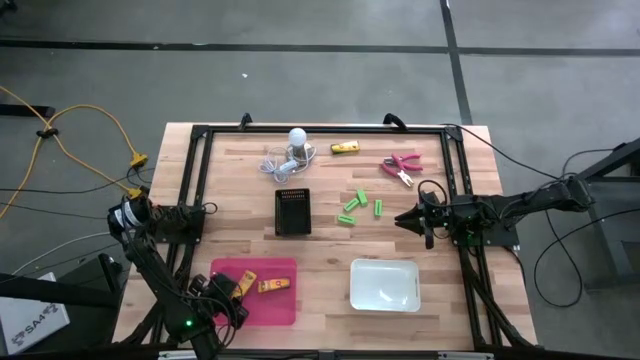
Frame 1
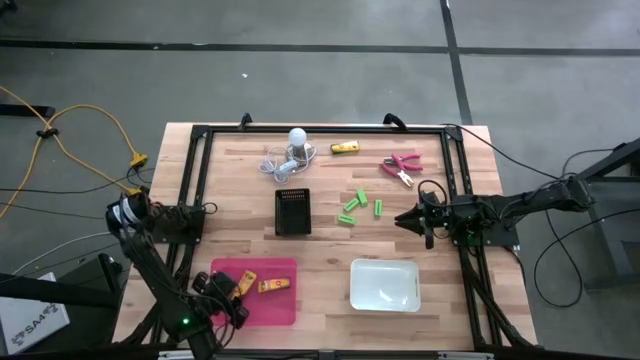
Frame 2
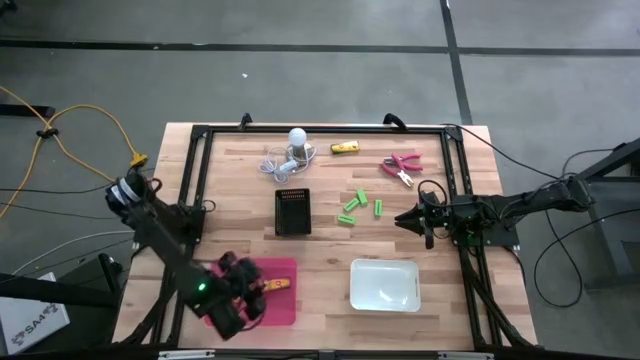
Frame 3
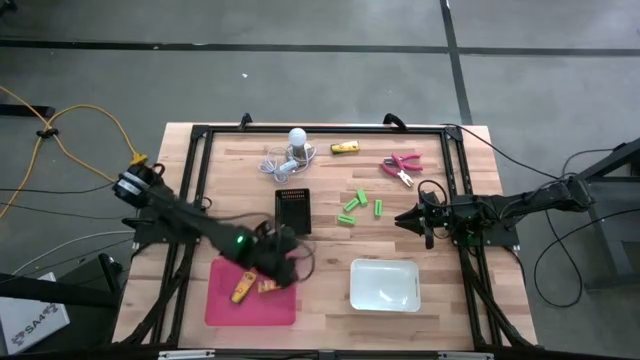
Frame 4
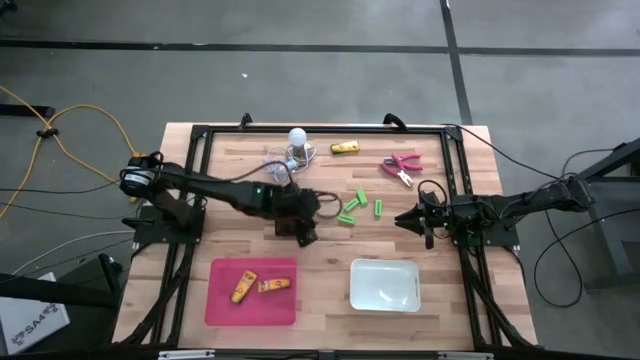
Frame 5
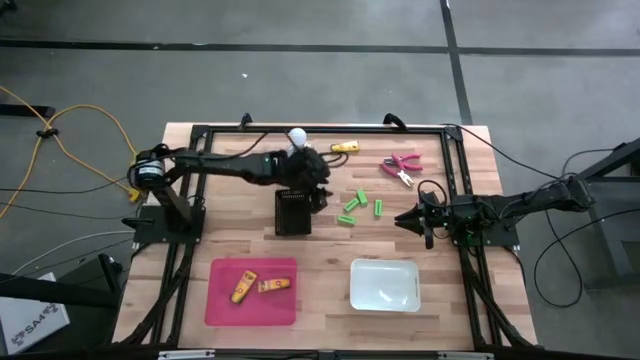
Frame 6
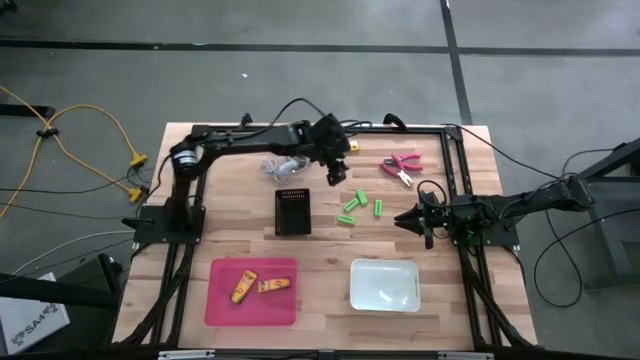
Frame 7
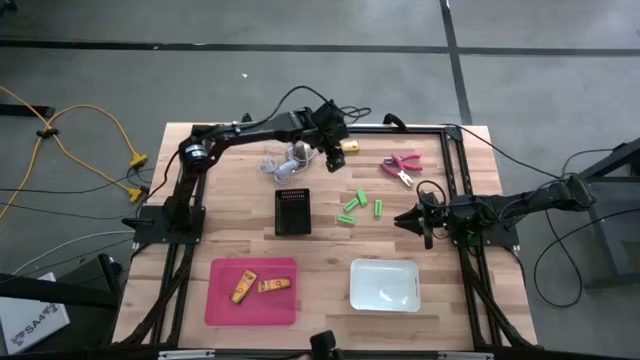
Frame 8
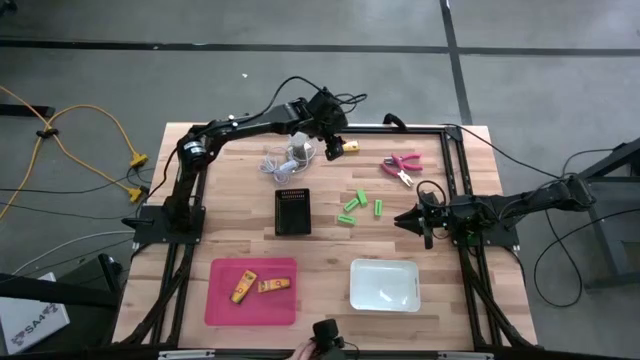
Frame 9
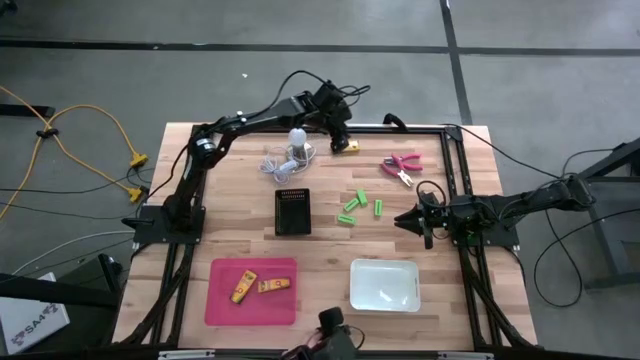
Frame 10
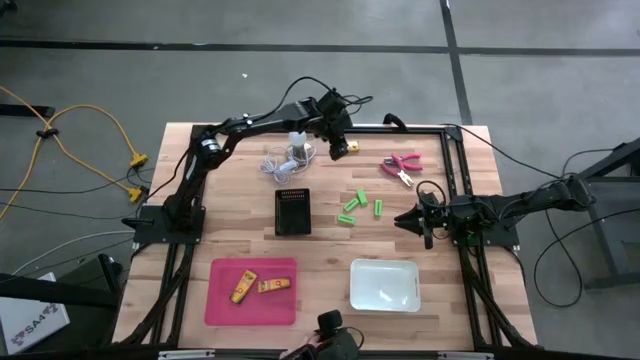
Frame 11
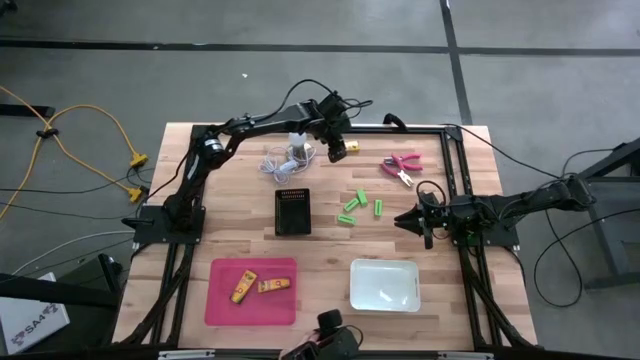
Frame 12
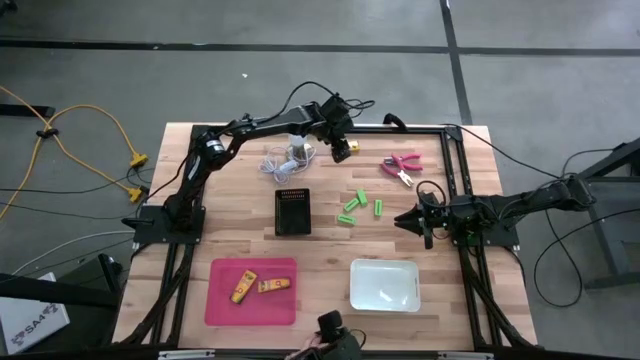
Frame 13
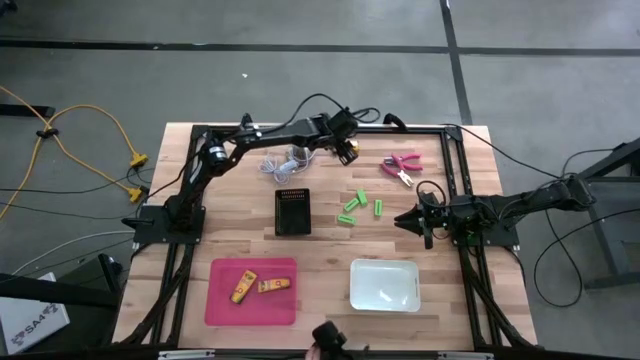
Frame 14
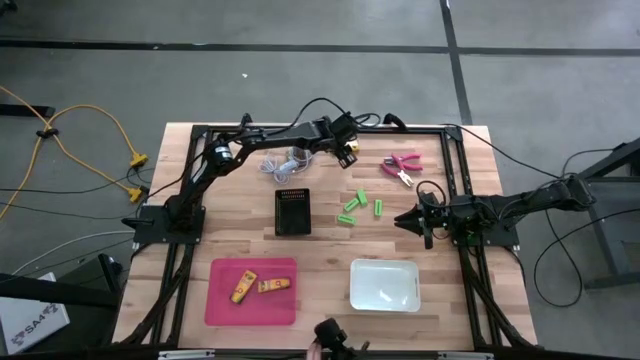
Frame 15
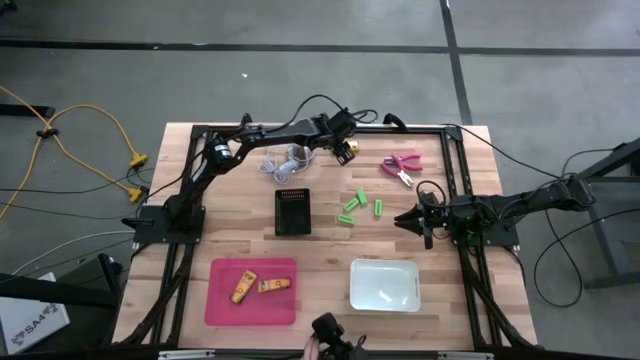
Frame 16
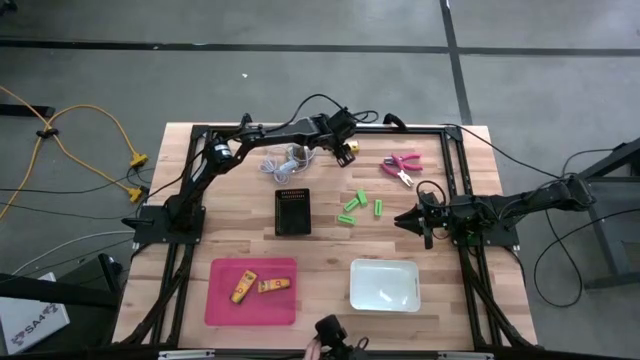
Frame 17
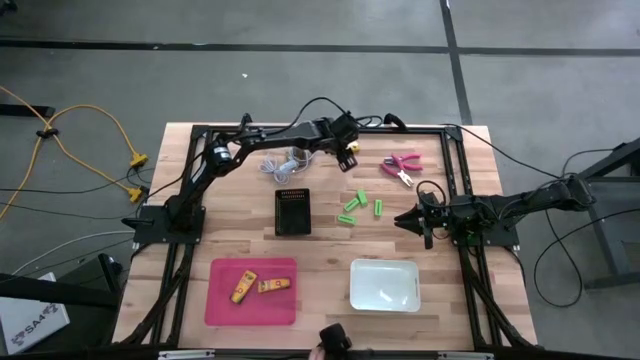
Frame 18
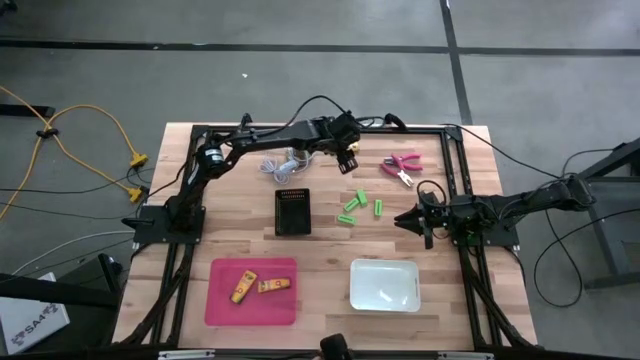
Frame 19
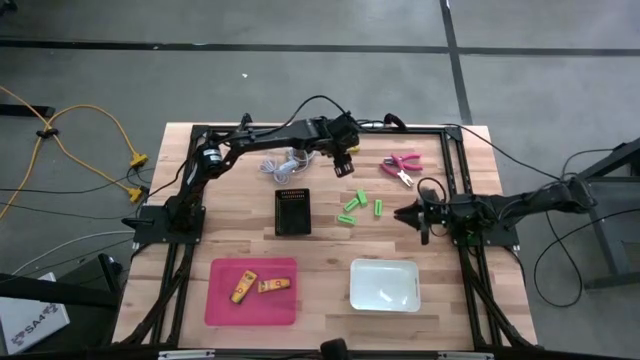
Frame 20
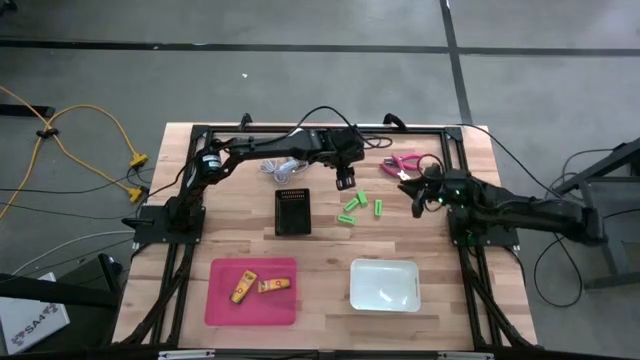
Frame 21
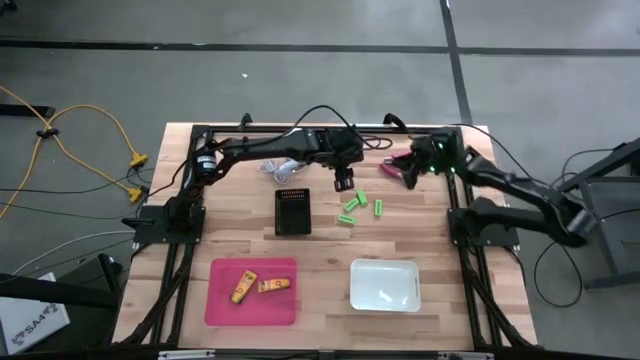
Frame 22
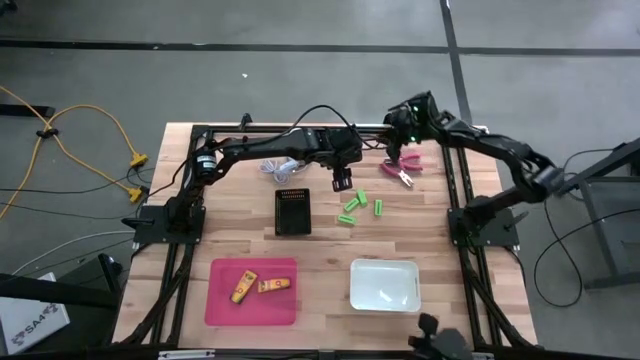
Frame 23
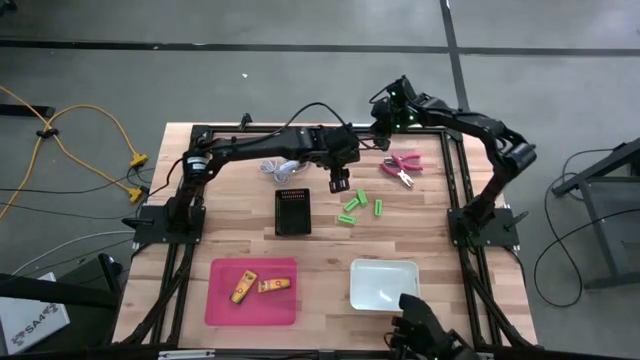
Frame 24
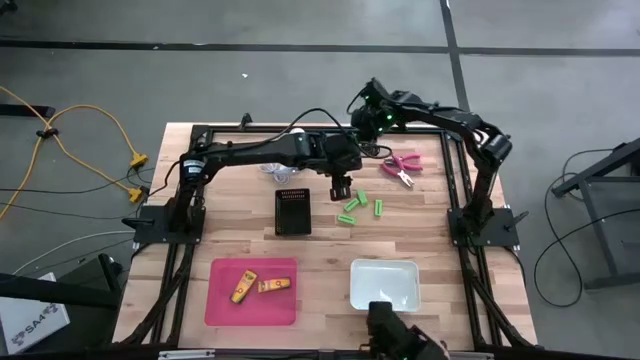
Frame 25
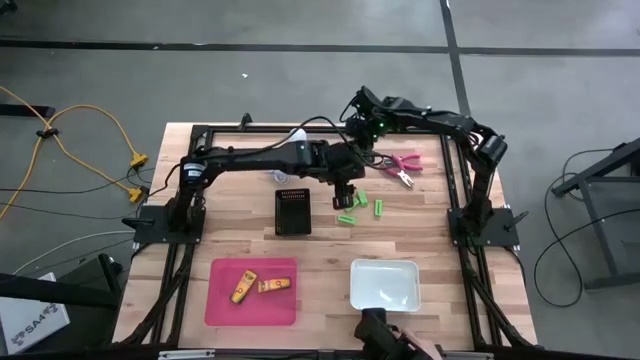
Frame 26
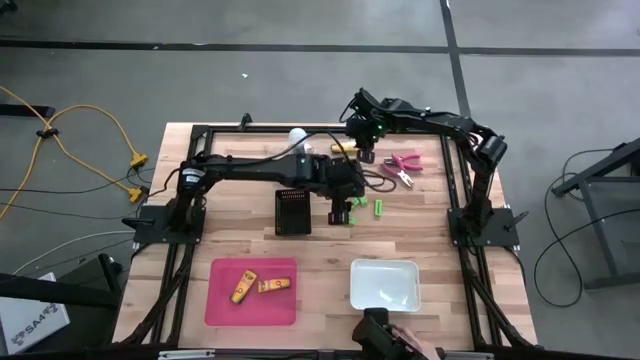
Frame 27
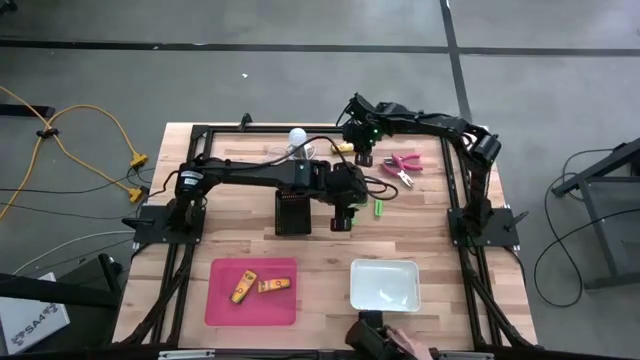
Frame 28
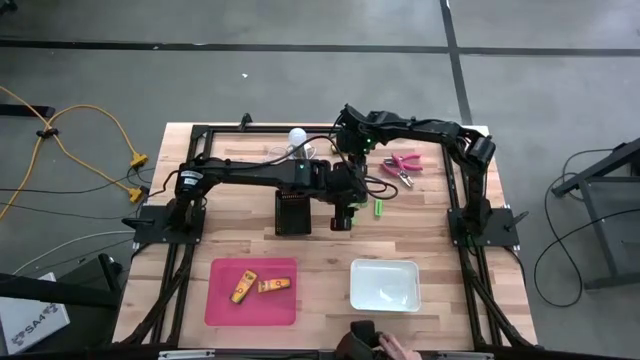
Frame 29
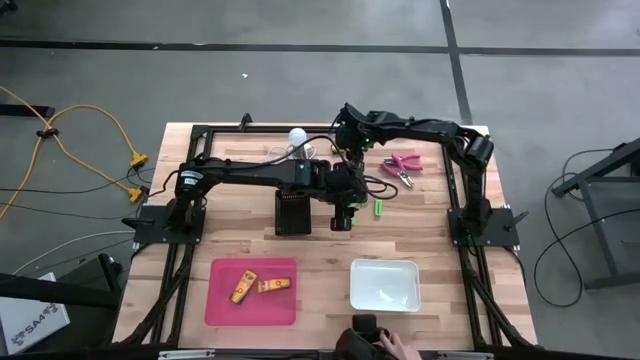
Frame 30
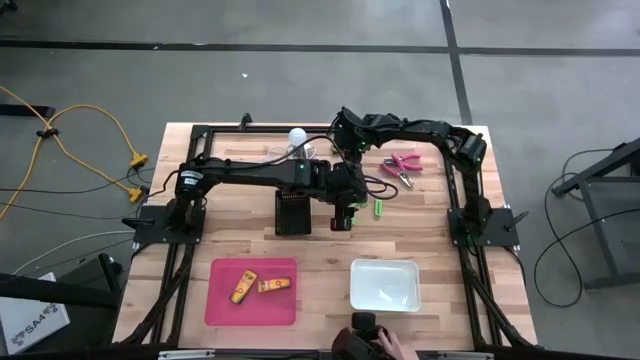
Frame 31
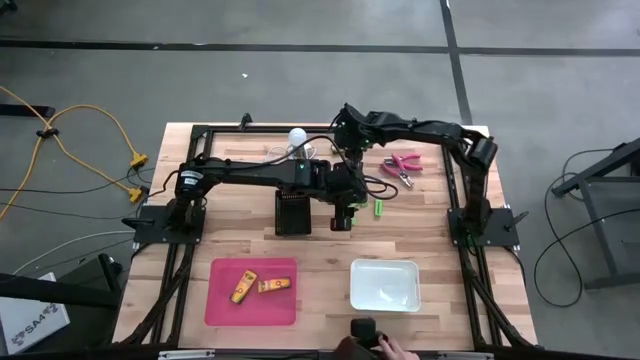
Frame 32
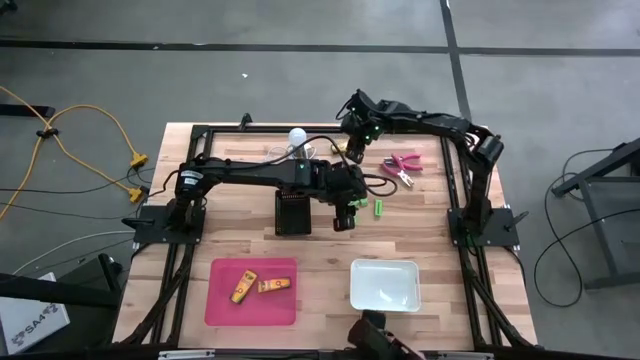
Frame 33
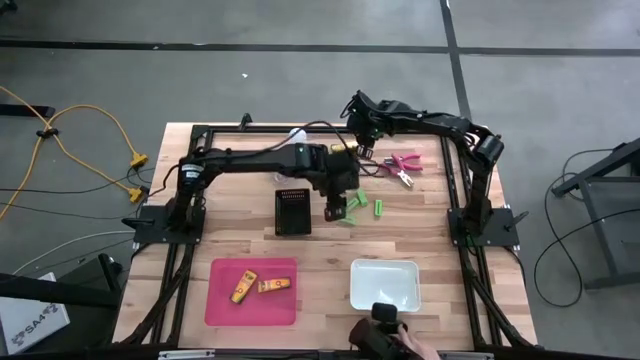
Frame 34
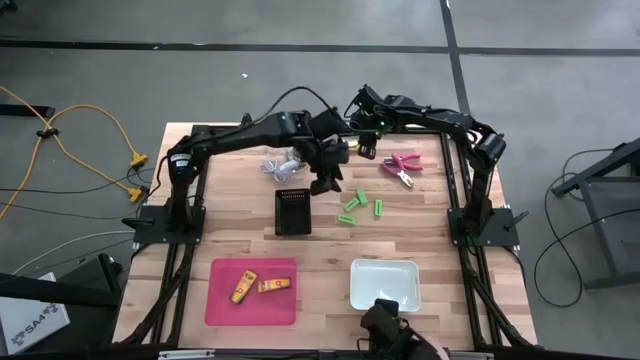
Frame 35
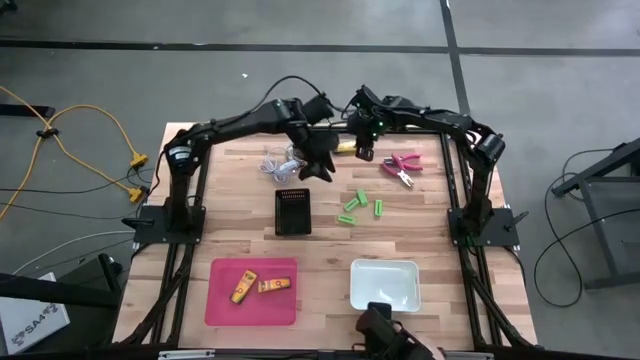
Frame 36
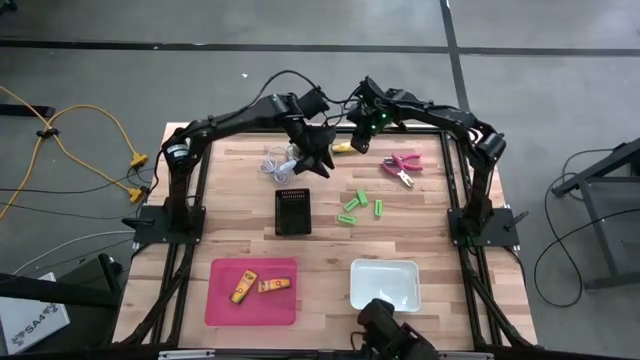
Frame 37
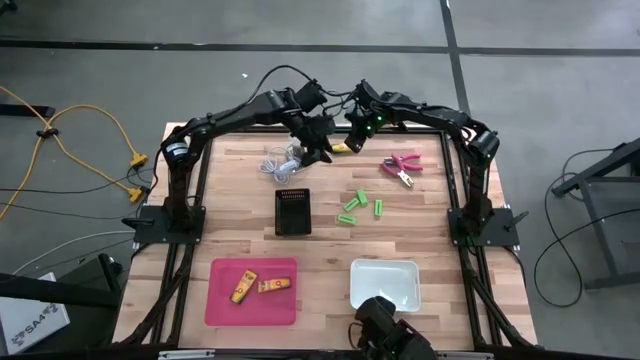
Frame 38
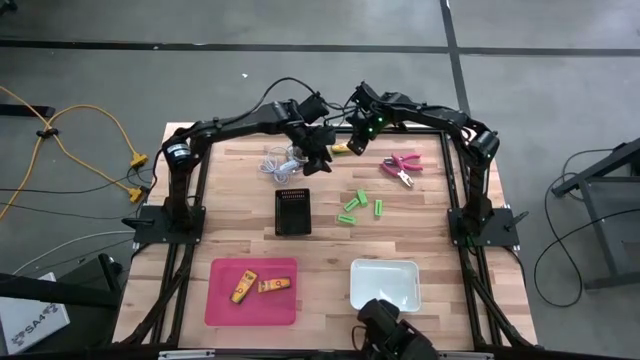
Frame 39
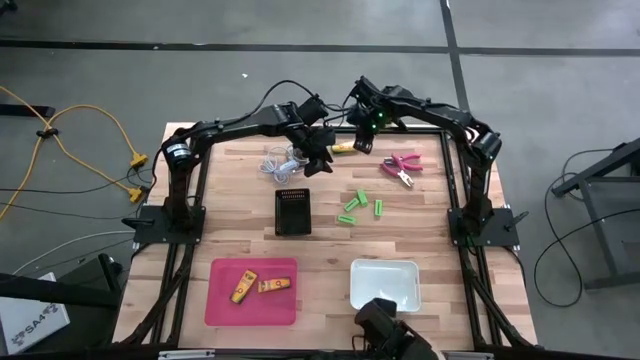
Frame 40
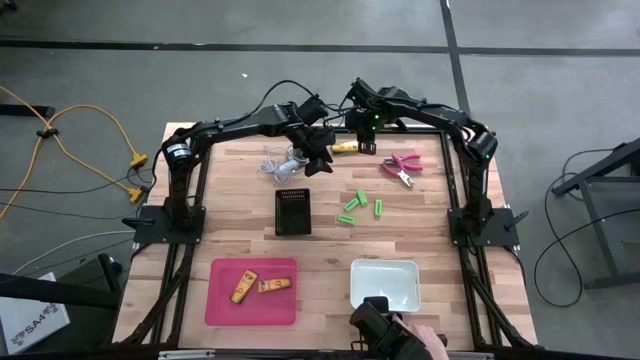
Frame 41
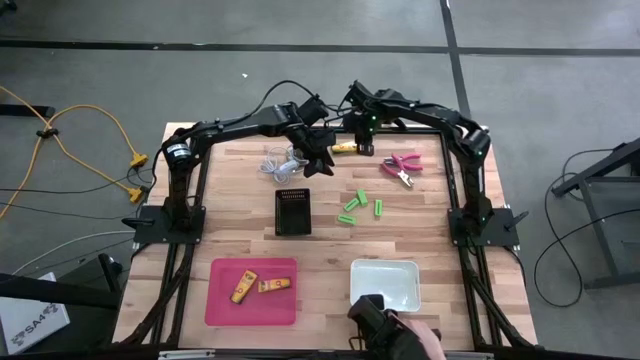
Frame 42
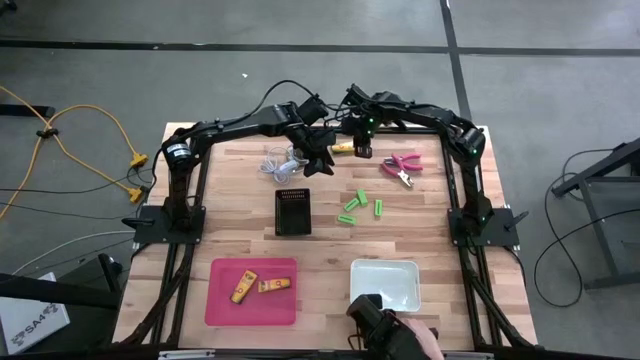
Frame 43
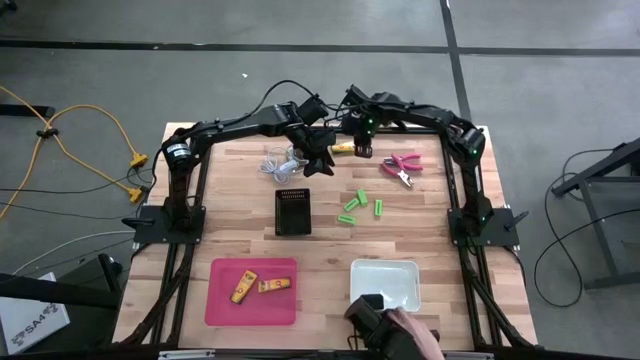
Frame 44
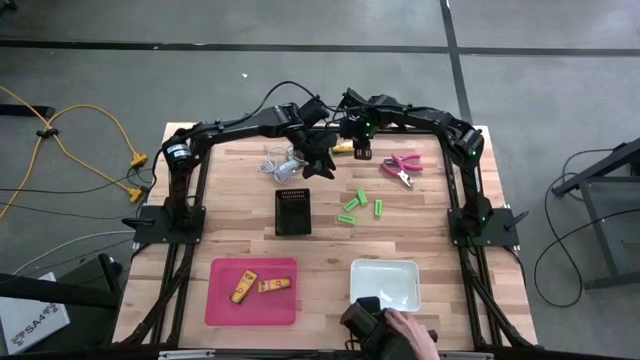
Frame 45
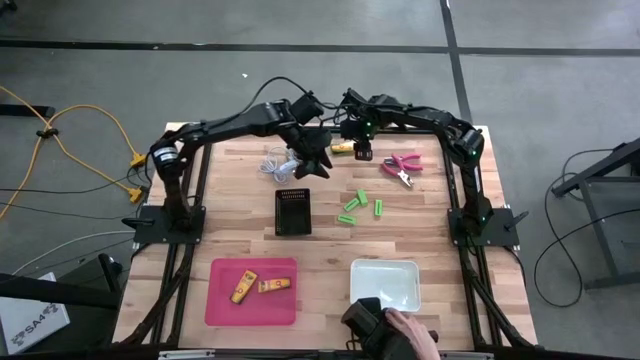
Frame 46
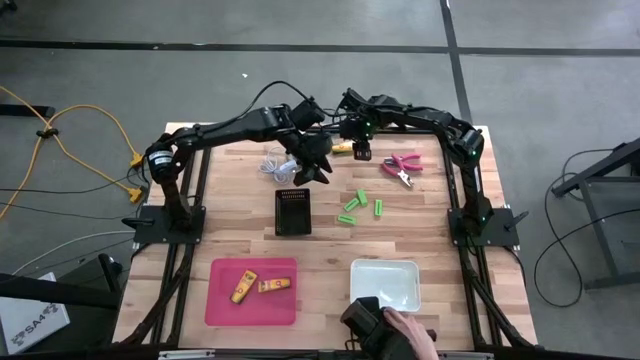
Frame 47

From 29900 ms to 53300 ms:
Task: Pick & Place School Supplies
Put the yellow crayon box into the pink bin
